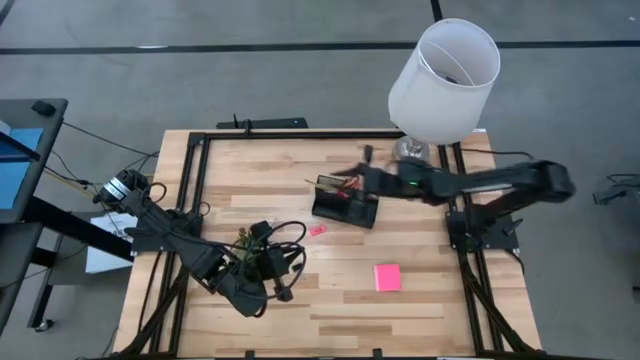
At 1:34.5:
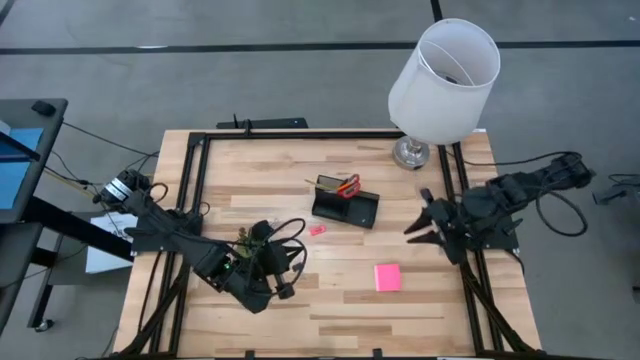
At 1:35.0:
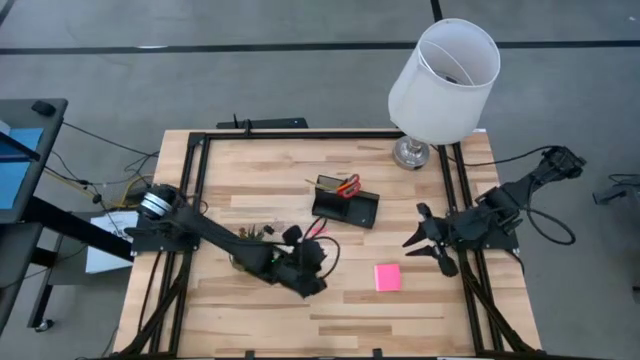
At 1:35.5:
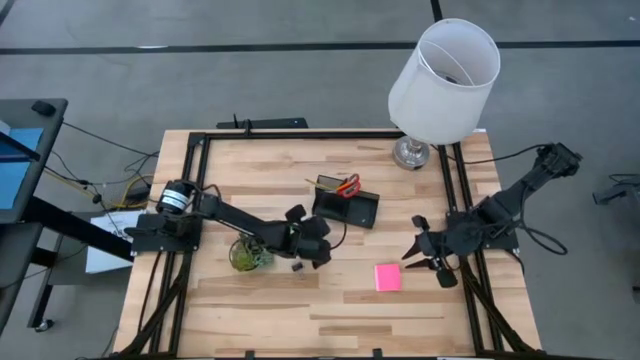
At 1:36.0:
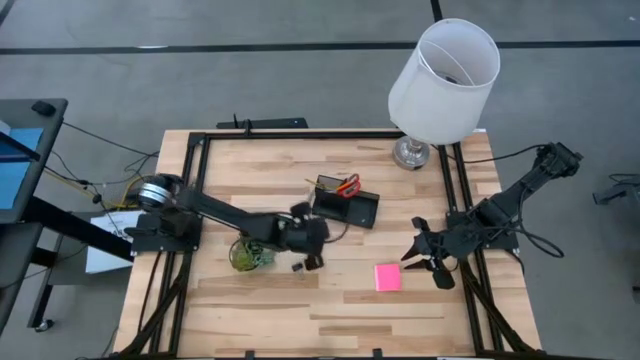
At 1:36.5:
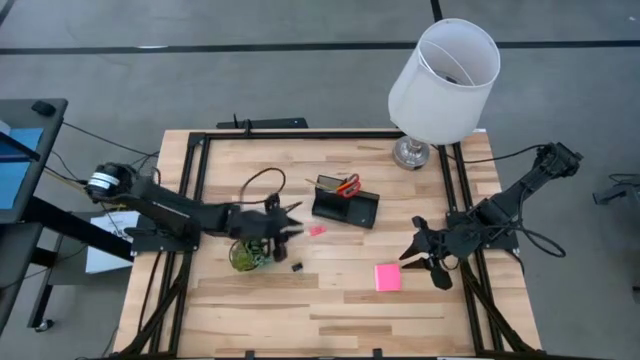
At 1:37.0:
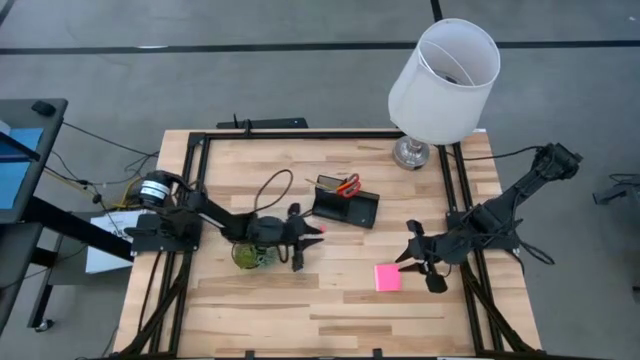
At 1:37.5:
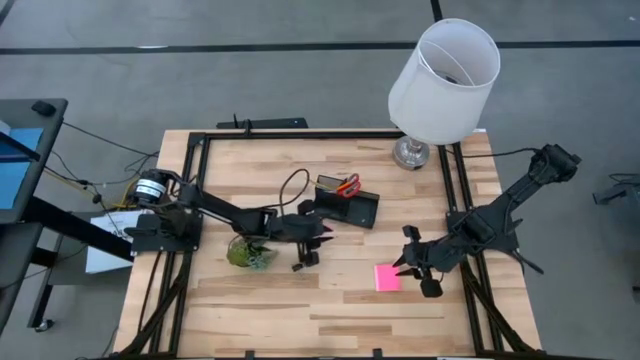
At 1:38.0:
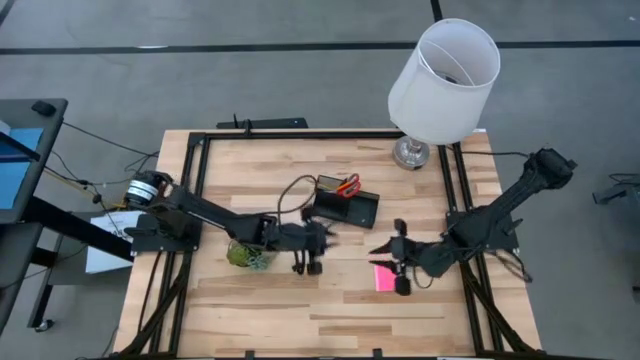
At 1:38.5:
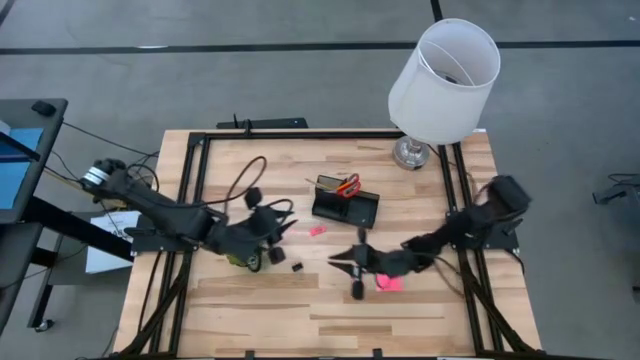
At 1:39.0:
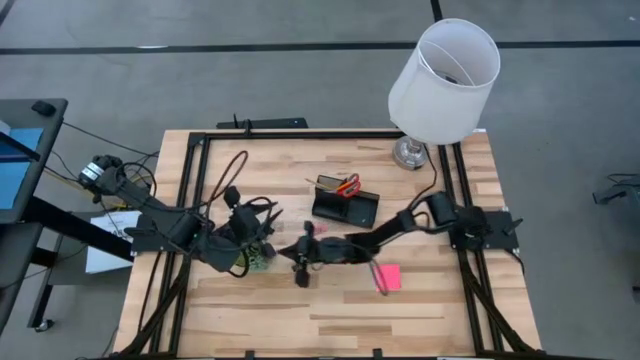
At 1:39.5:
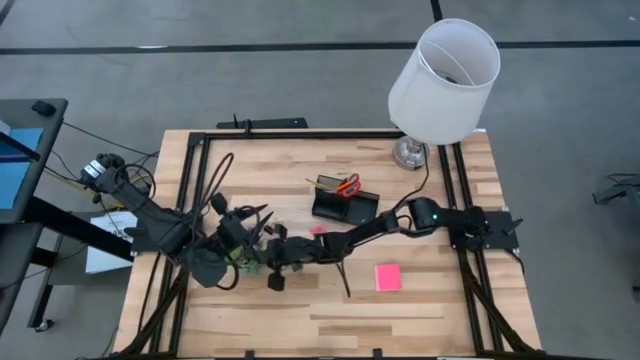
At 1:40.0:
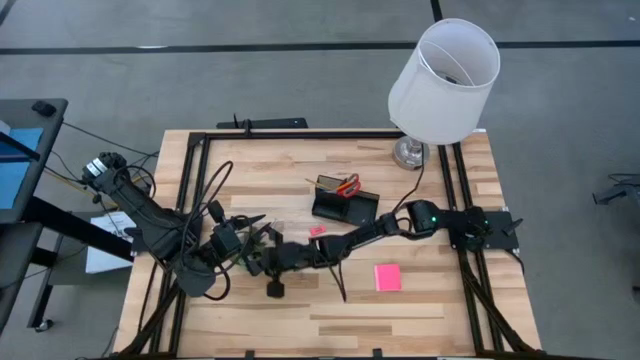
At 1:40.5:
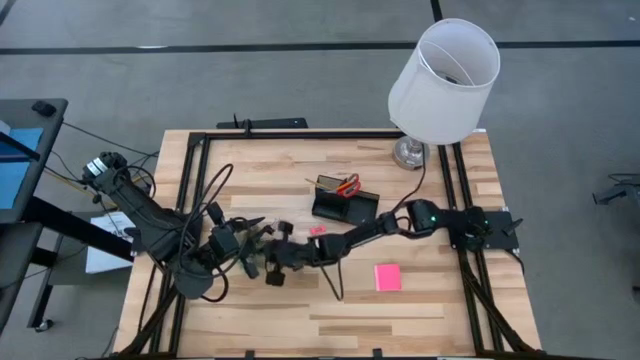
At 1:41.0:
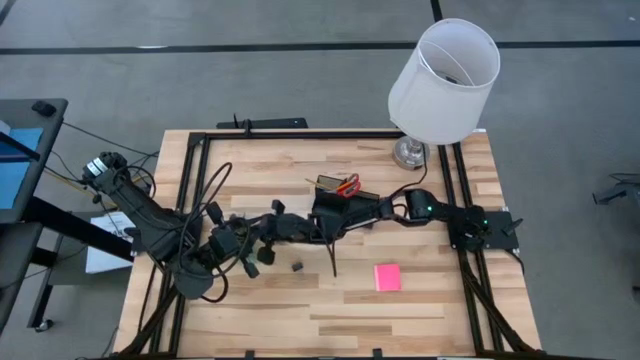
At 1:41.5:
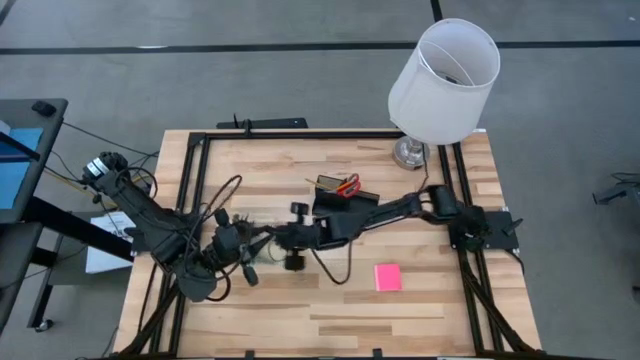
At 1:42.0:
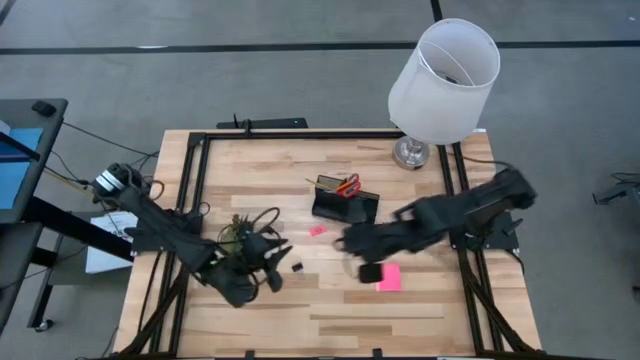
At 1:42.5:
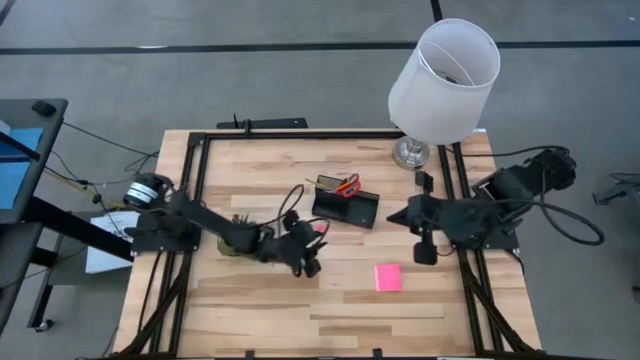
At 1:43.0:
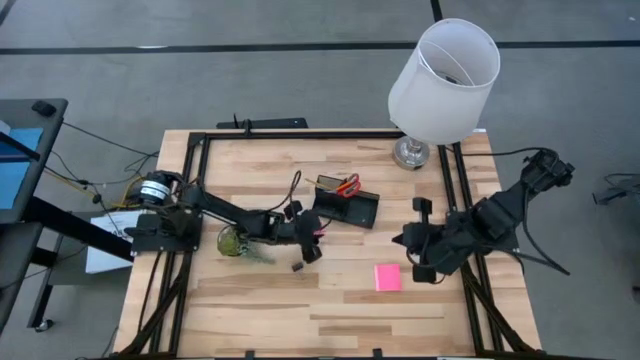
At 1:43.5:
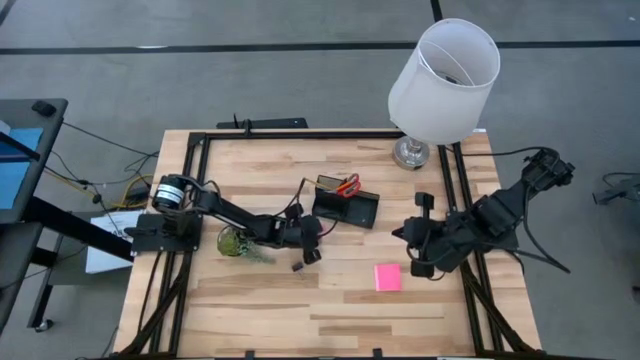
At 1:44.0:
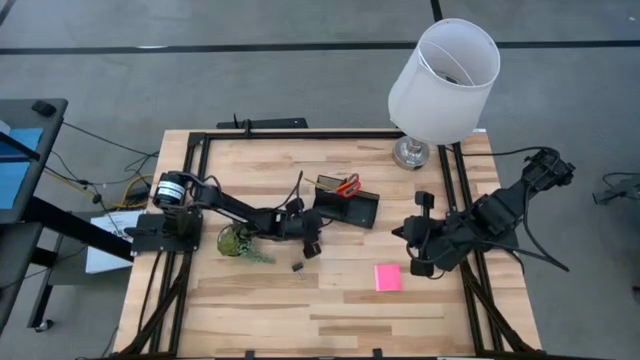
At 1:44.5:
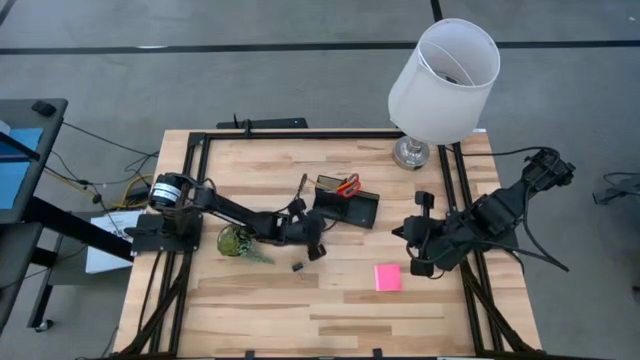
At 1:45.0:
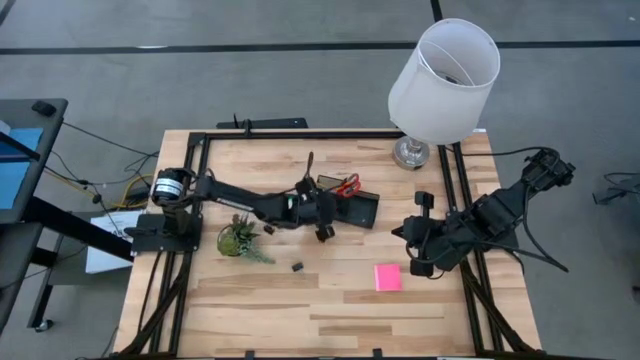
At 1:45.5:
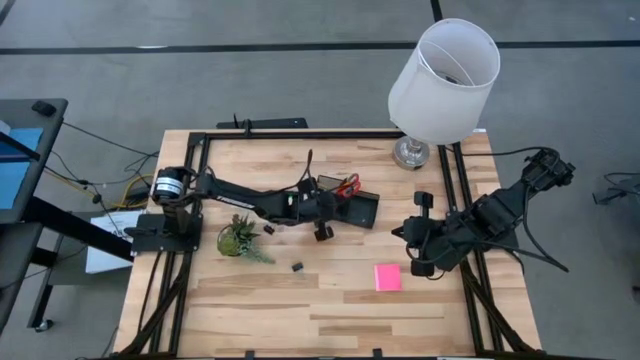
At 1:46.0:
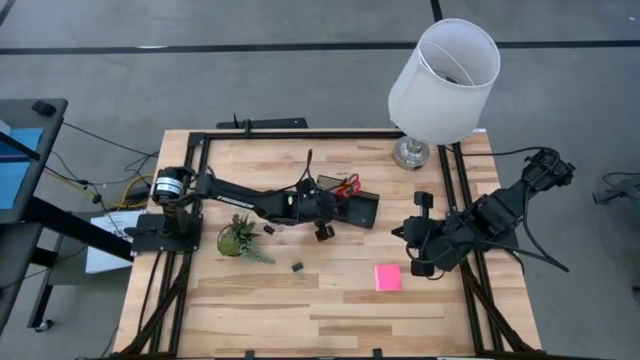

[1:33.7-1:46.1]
Task: Pick and place office supplies into organizer
Put the pink eraser into the lower left compartment of the black desk organizer

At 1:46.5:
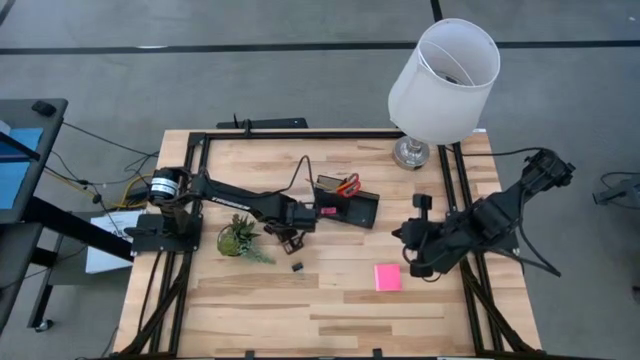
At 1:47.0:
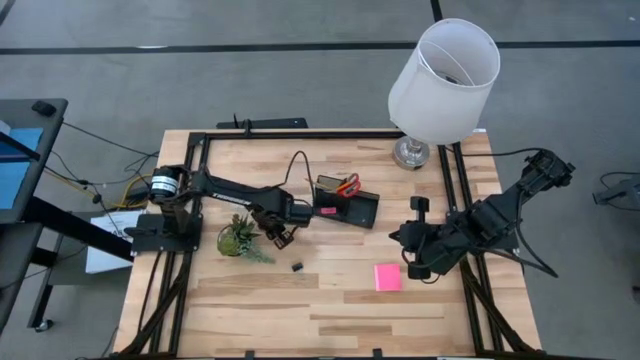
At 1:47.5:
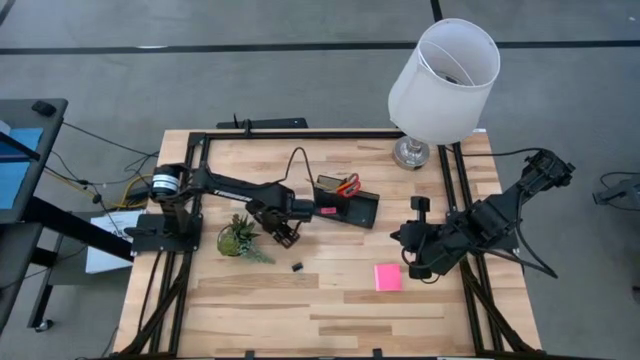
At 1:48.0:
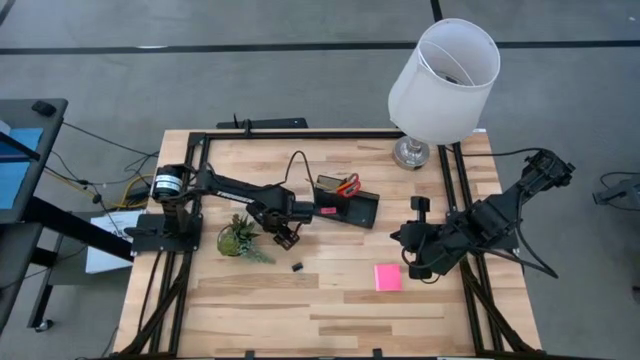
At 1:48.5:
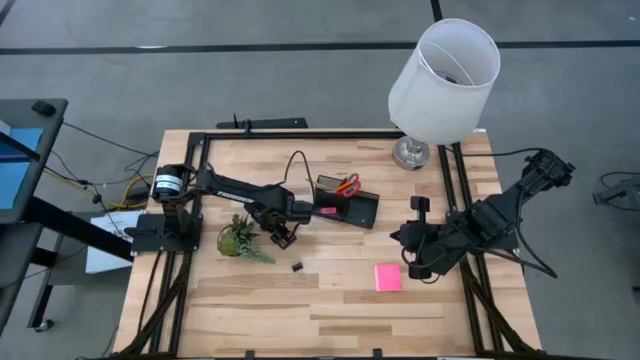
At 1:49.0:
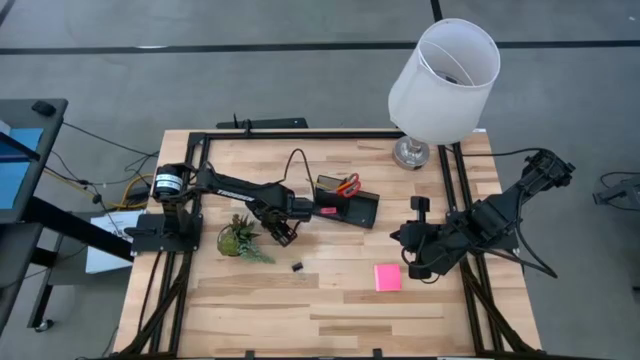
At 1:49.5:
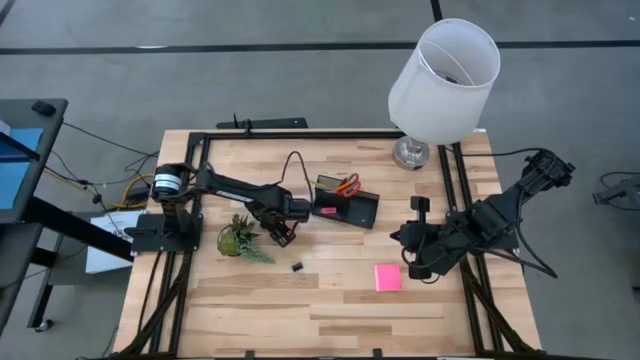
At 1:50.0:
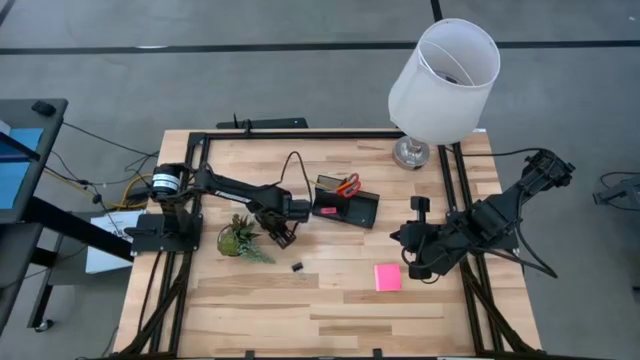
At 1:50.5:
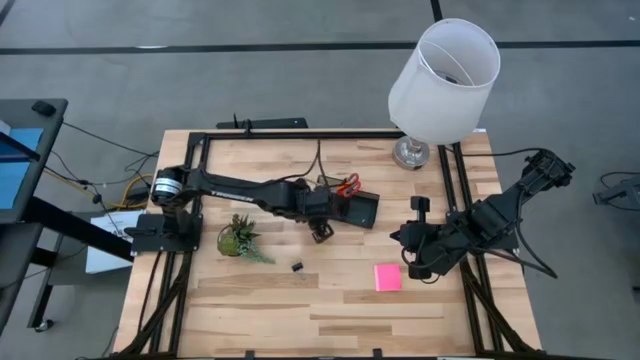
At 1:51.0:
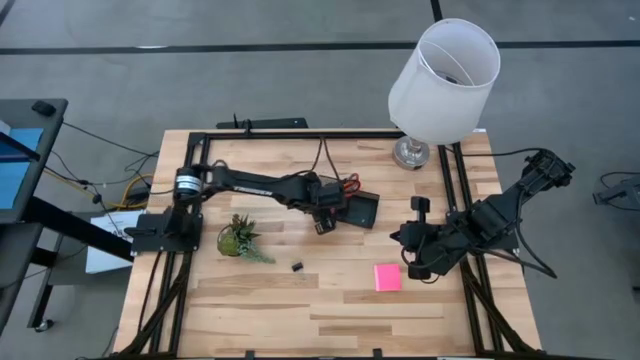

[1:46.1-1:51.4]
Put the black binder clip into the bottom left compartment of the black desk organizer

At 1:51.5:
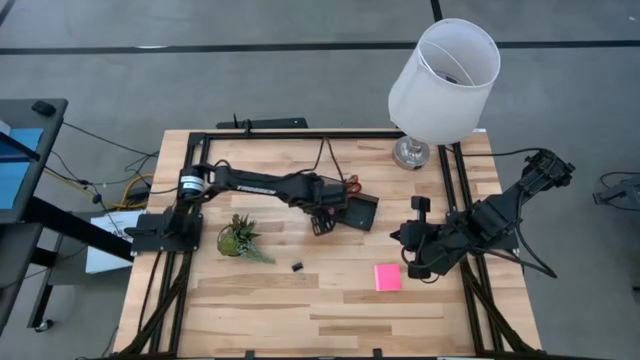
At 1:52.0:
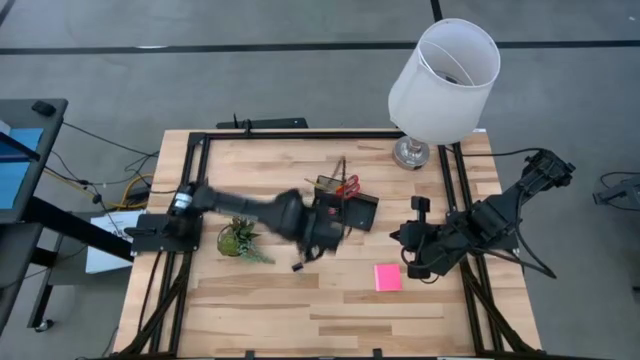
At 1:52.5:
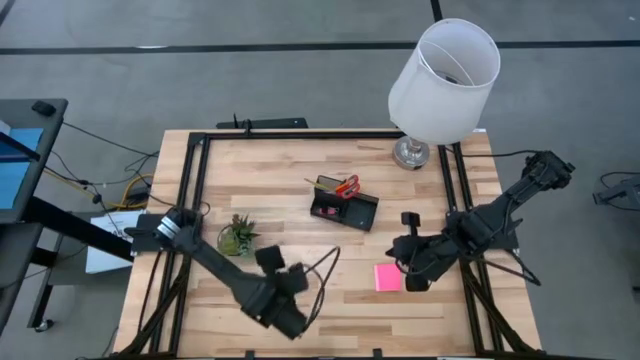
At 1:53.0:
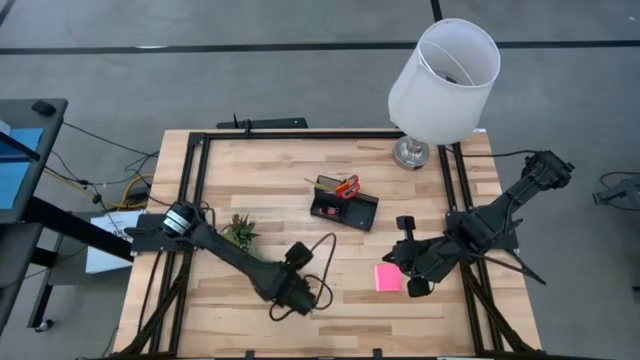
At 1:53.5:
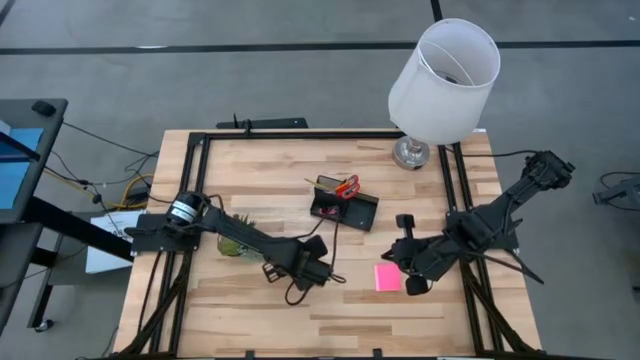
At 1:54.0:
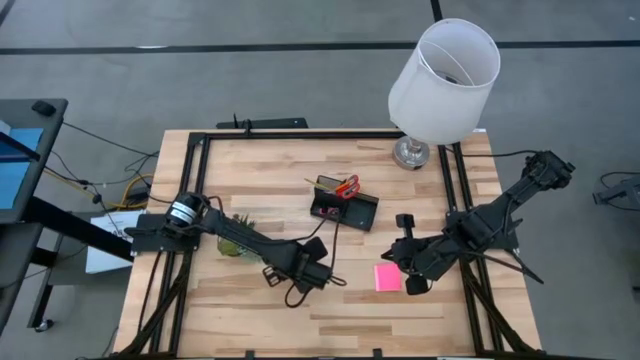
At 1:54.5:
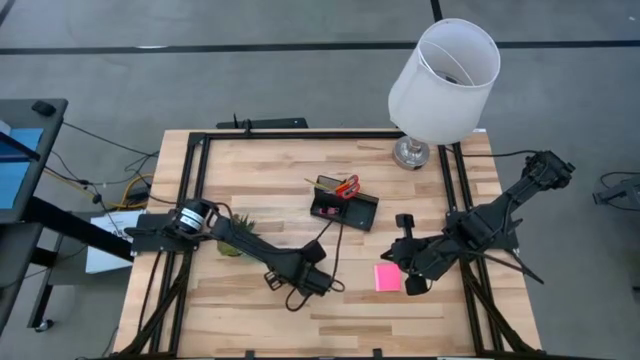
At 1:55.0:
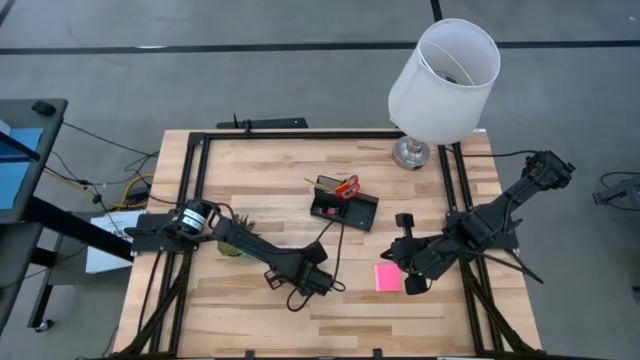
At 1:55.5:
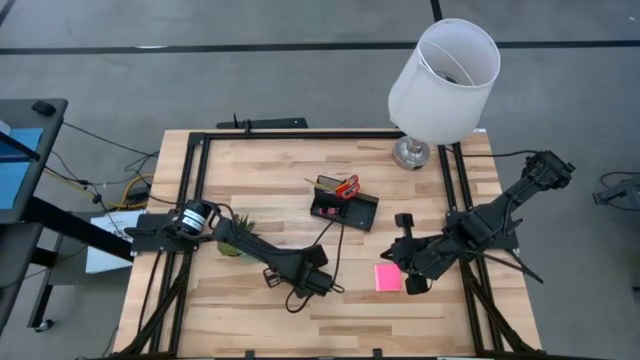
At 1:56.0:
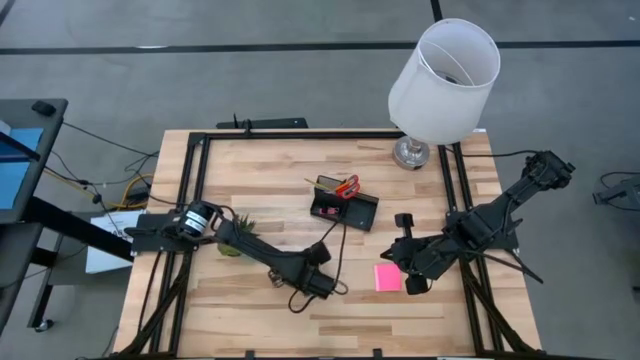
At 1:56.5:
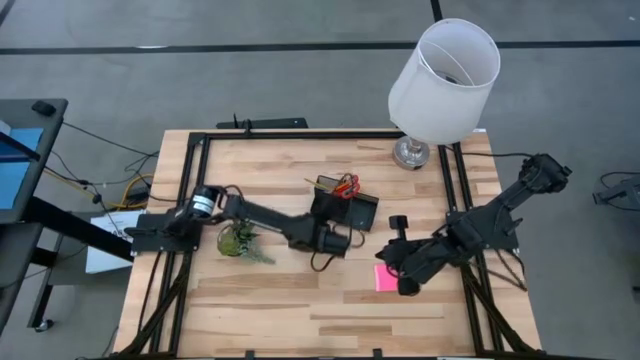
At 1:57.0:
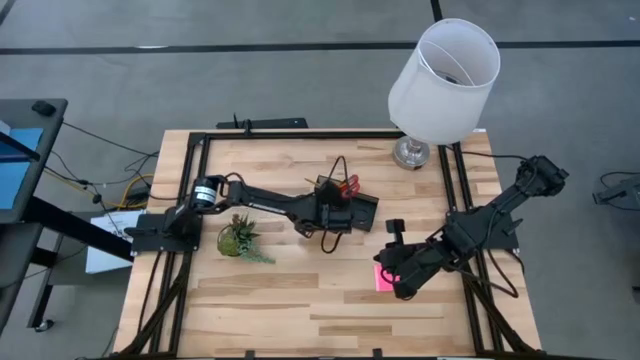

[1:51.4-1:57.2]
Put the black binder clip into the lower left compartment of the black desk organizer
